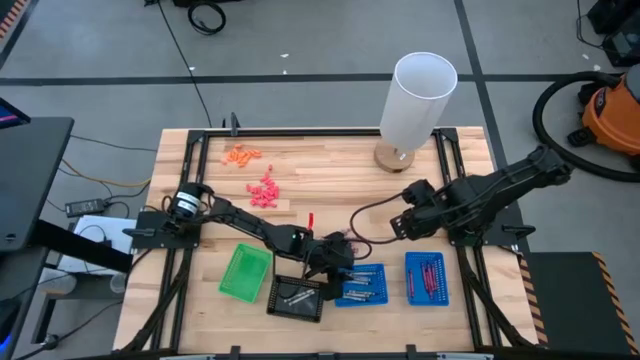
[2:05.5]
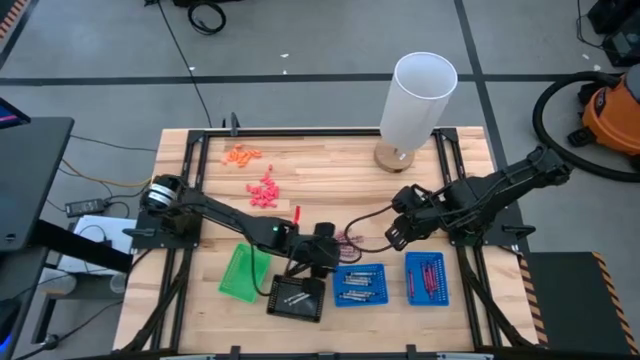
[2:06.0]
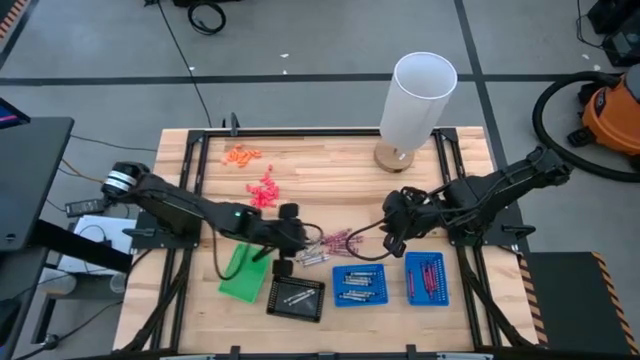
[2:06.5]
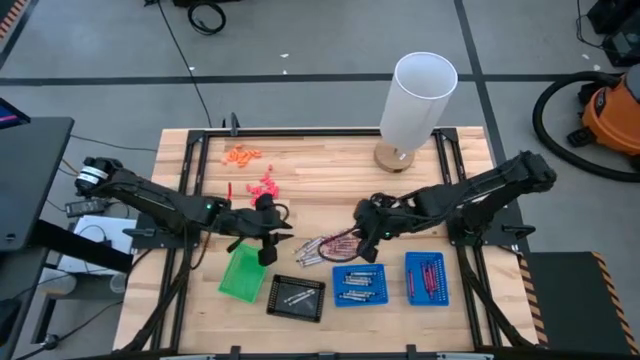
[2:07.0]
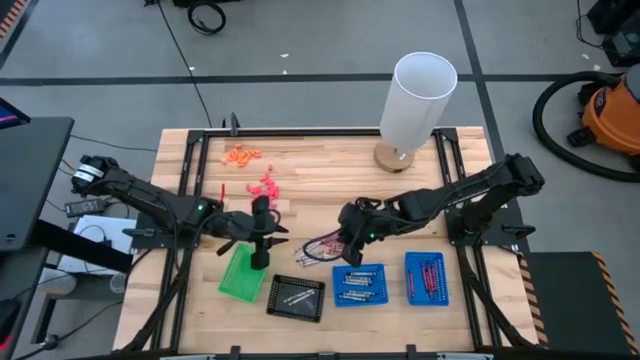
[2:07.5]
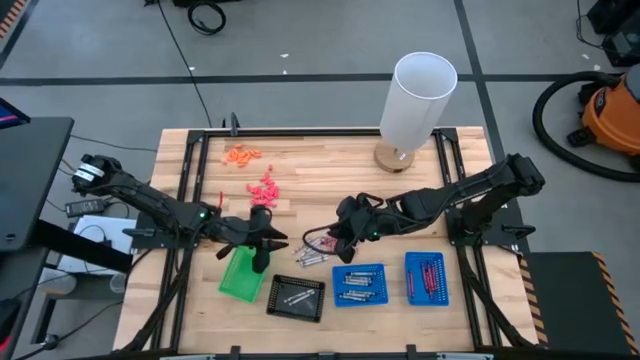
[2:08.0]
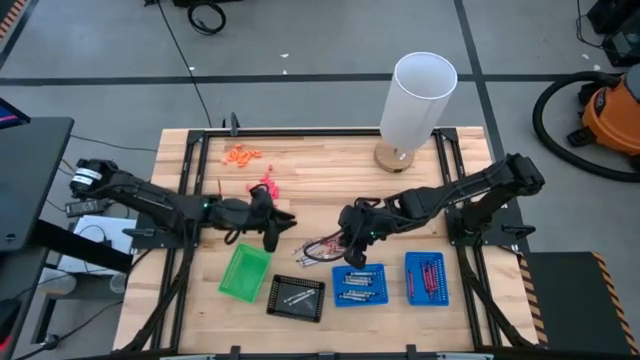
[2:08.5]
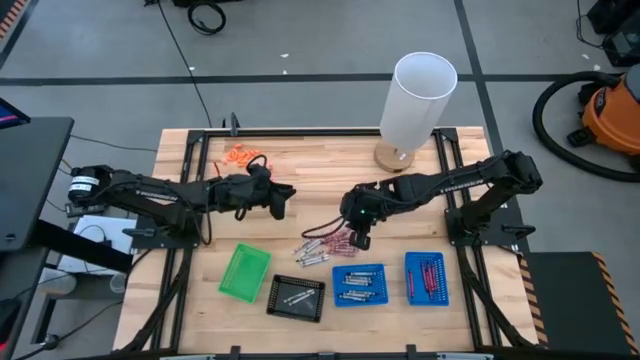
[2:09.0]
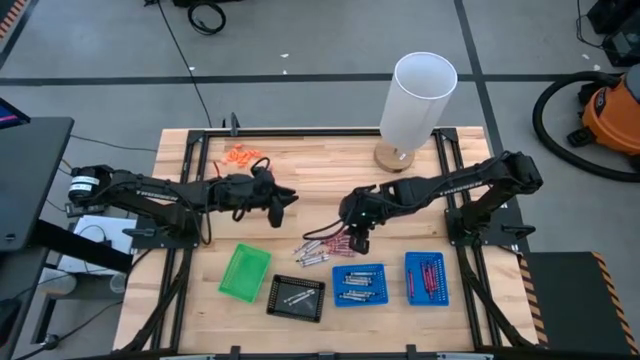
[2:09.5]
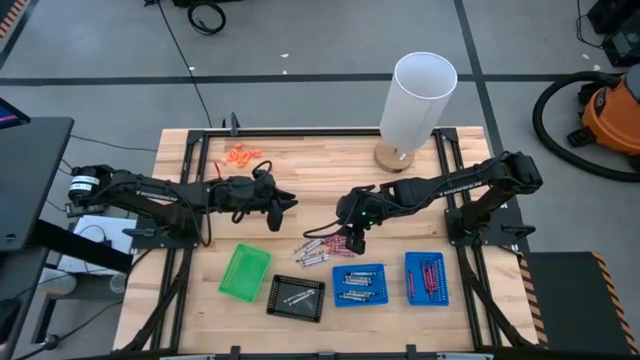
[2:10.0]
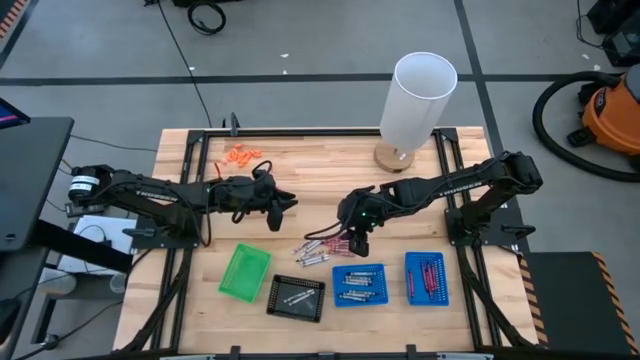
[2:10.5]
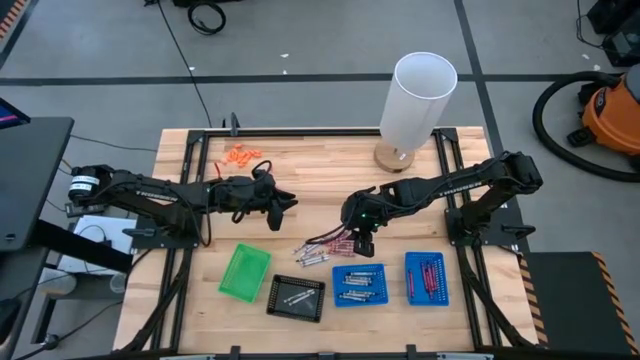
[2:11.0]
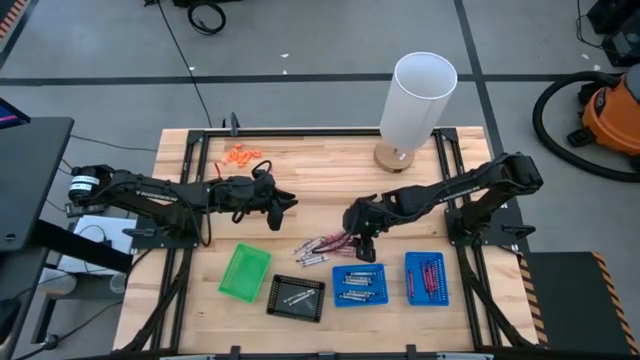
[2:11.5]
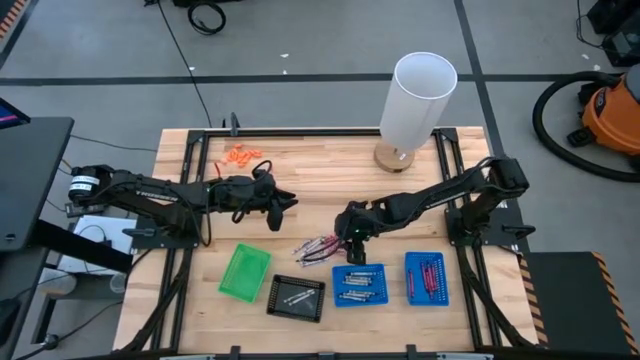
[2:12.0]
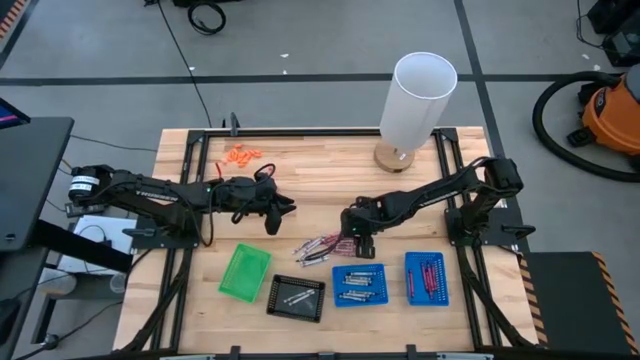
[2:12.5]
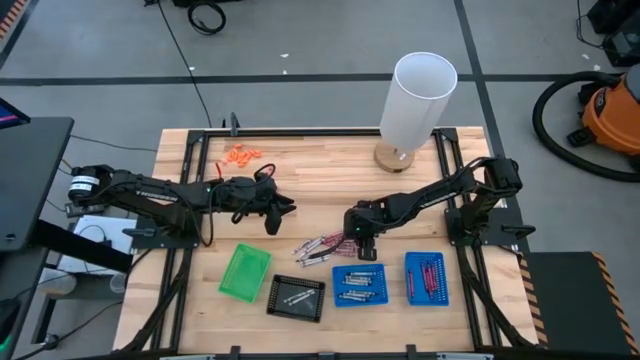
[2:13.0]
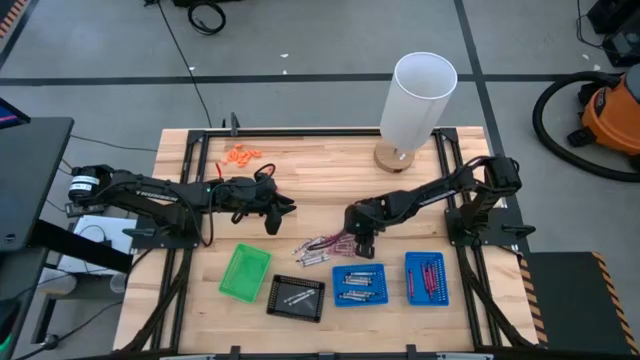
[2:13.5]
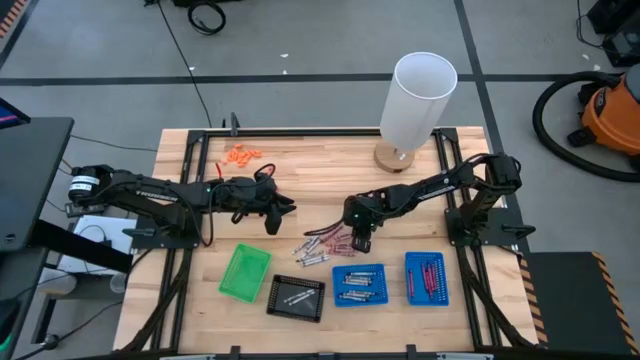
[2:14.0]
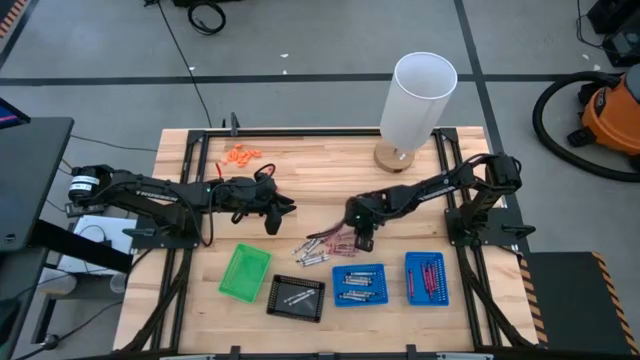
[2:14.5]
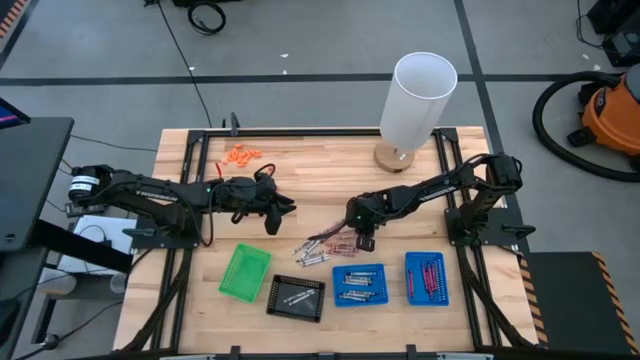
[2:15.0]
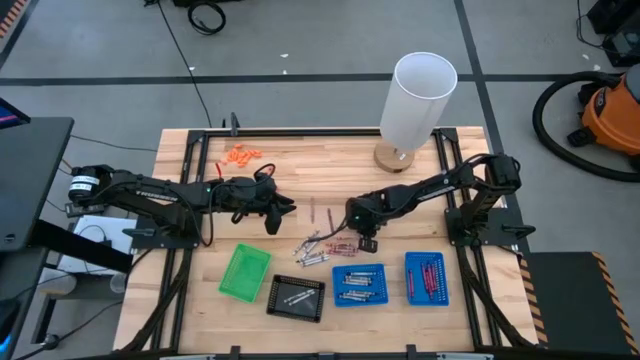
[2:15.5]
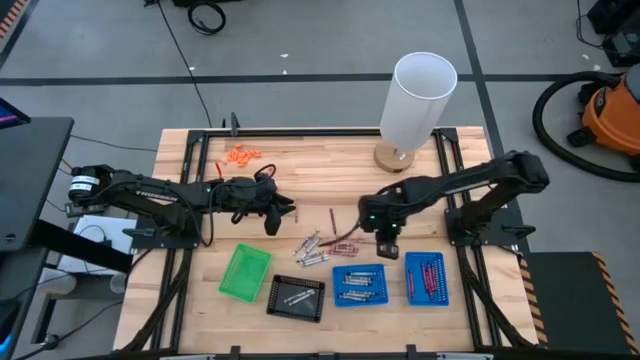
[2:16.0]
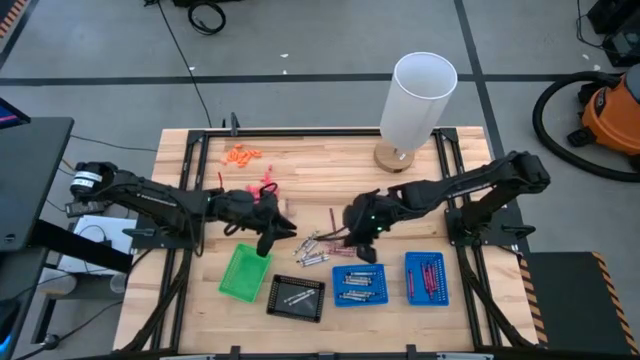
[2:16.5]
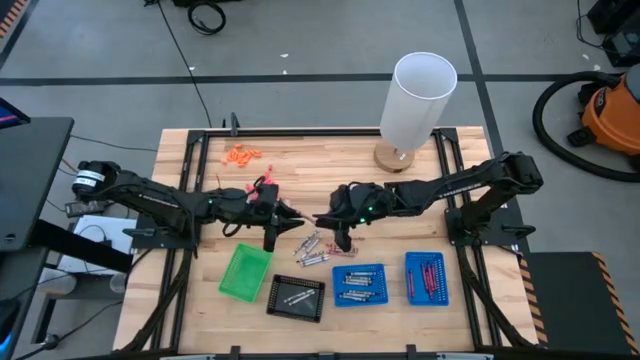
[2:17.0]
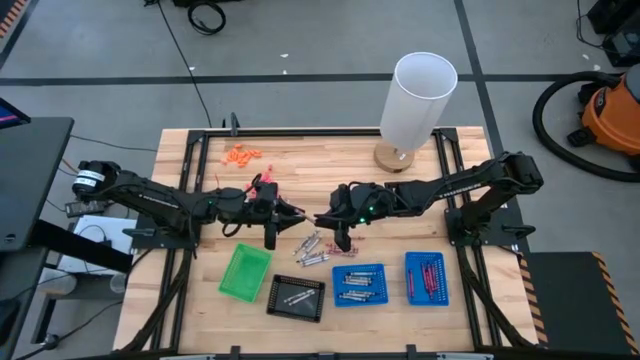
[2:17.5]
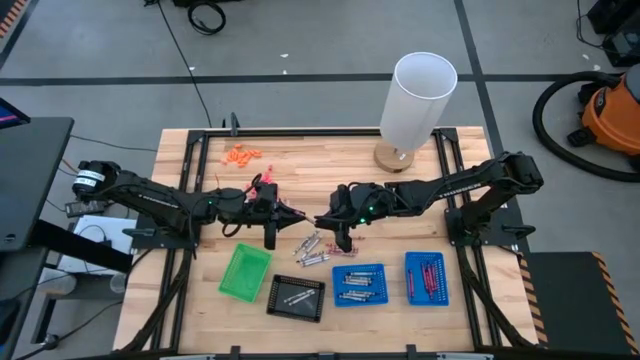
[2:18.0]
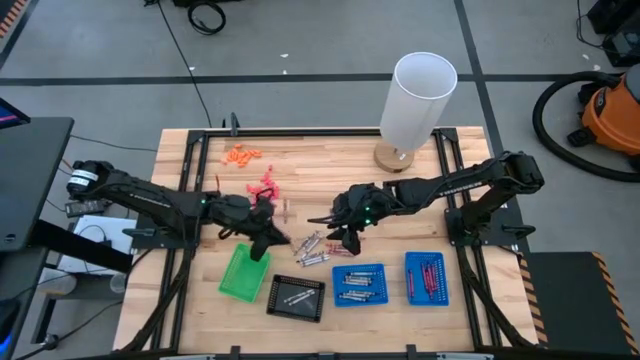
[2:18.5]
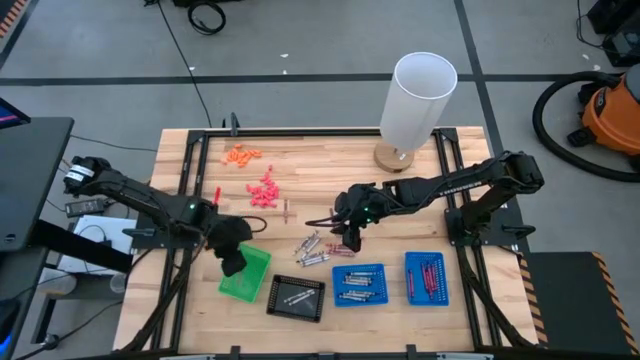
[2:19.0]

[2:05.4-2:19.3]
Task: Sort crayons
Put the pink crayon into the green basket

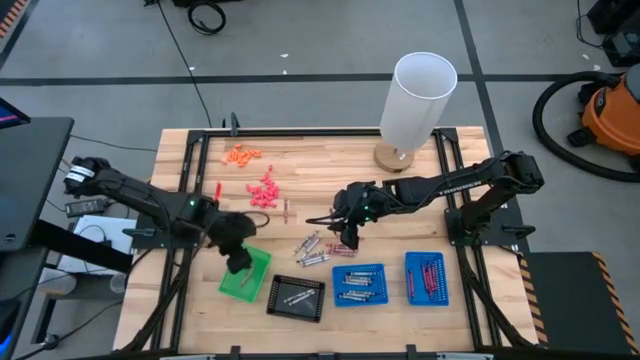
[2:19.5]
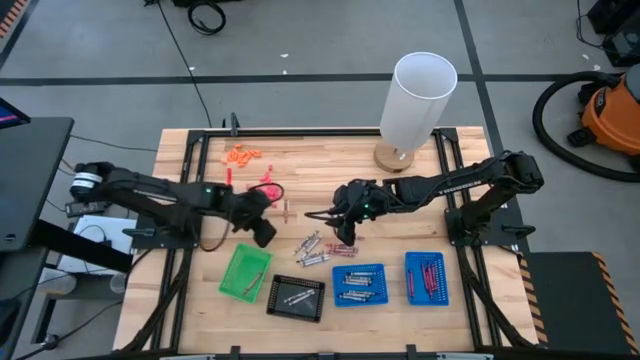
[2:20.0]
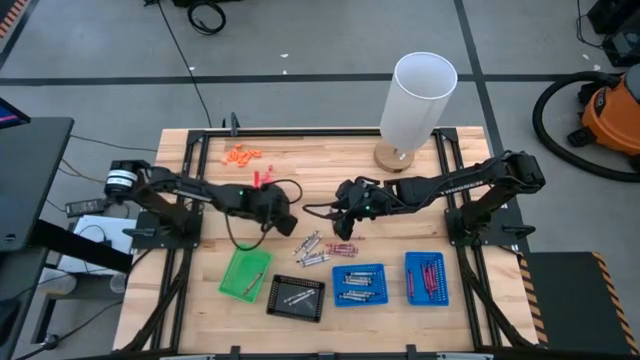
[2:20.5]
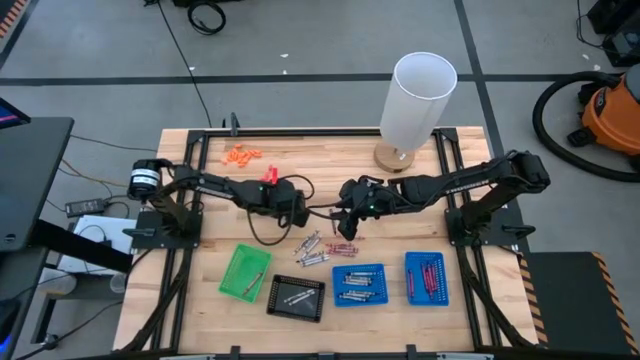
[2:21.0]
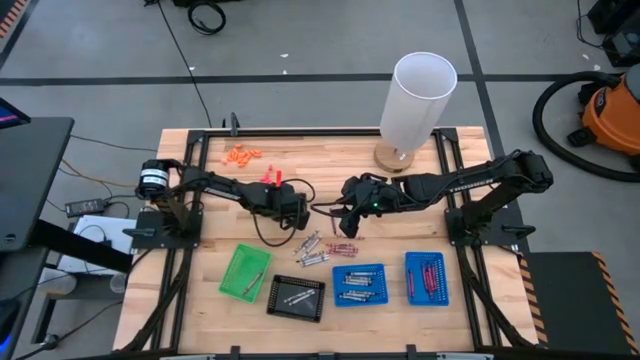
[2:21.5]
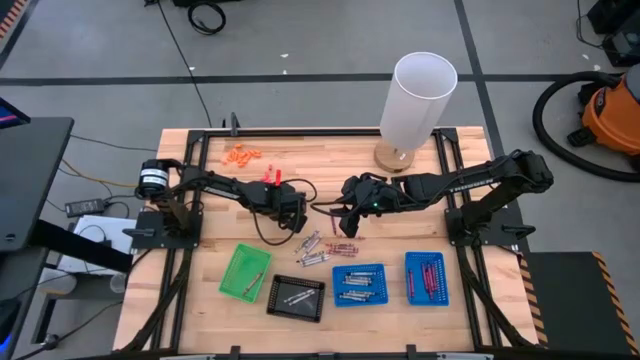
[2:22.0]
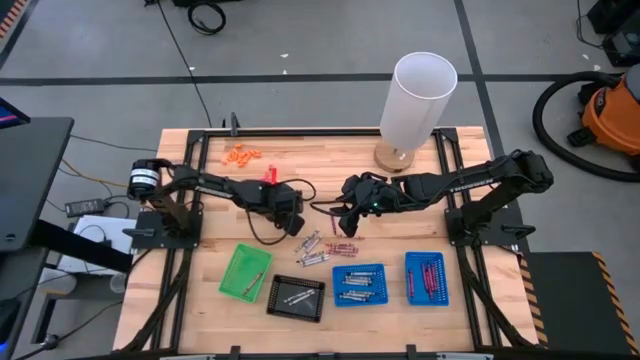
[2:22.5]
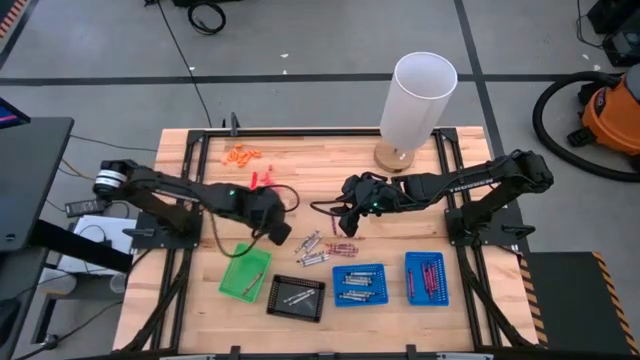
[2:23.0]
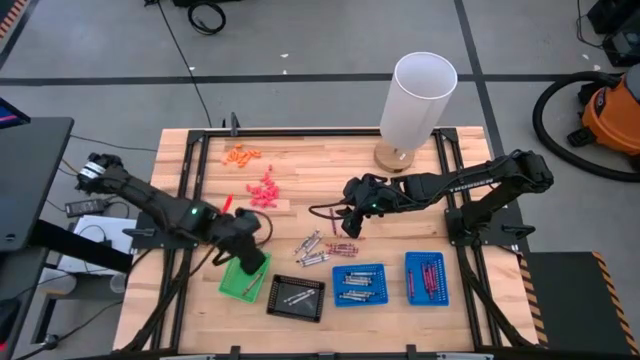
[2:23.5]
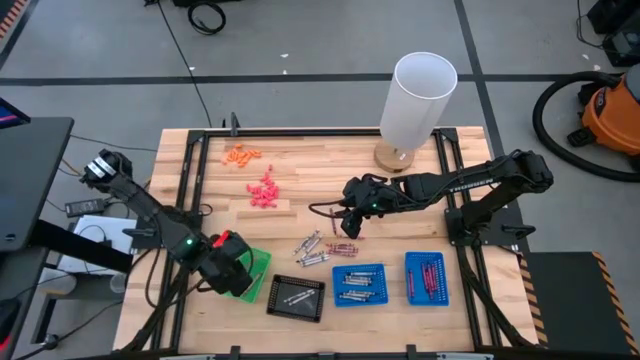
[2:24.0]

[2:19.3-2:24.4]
Put the pink crayon into the green basket

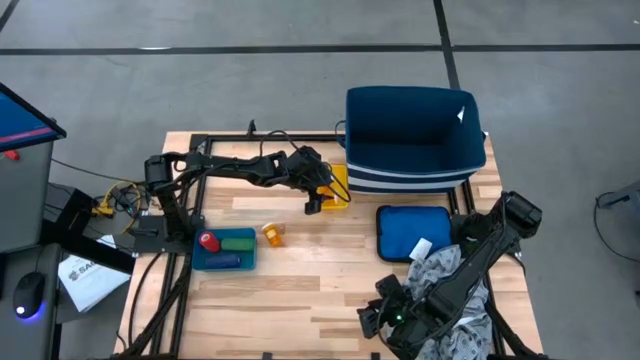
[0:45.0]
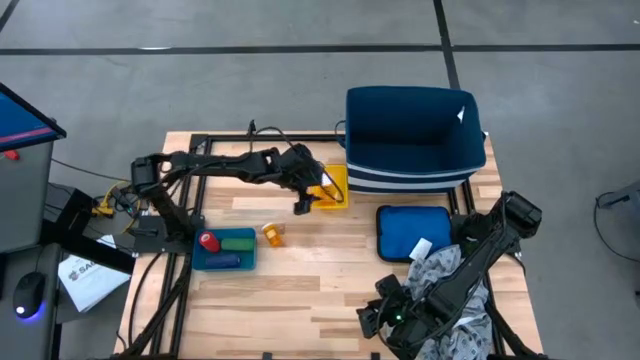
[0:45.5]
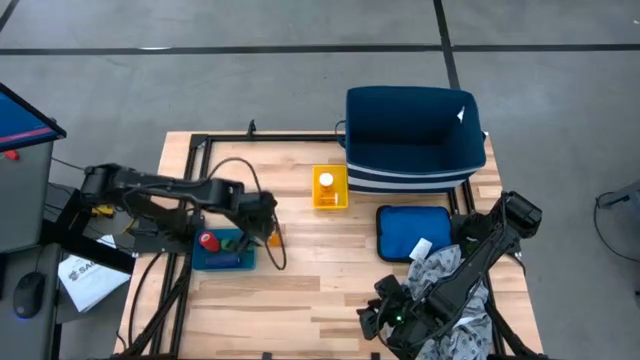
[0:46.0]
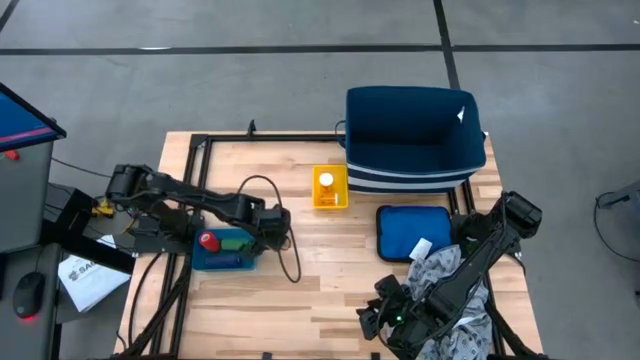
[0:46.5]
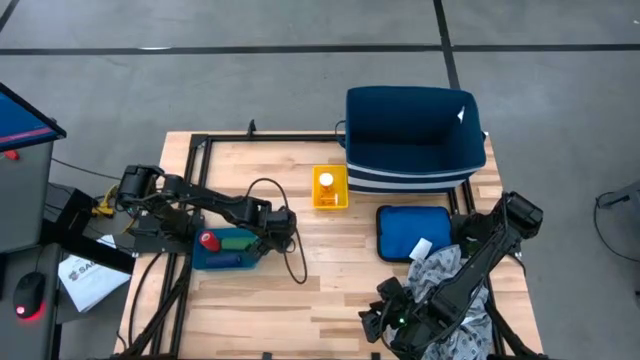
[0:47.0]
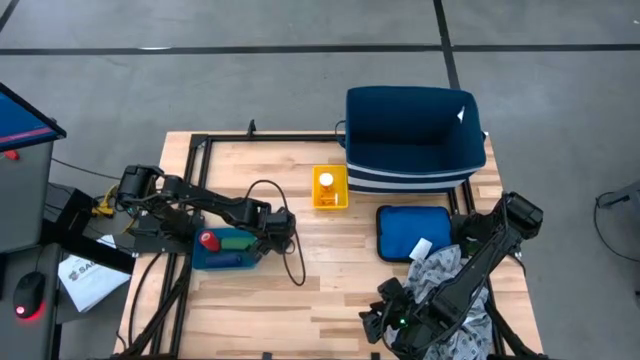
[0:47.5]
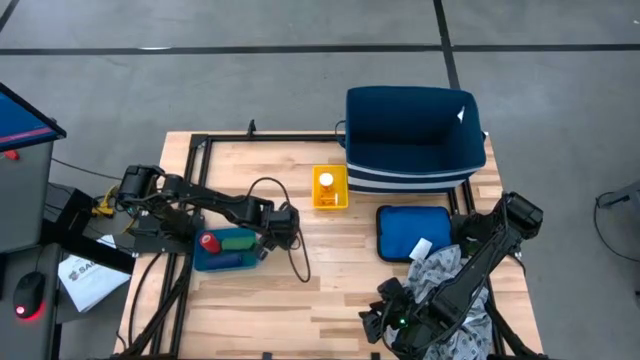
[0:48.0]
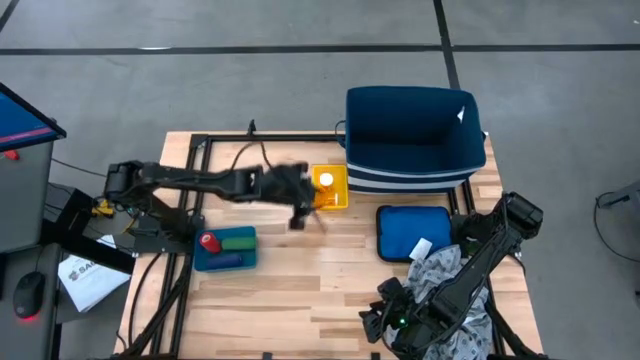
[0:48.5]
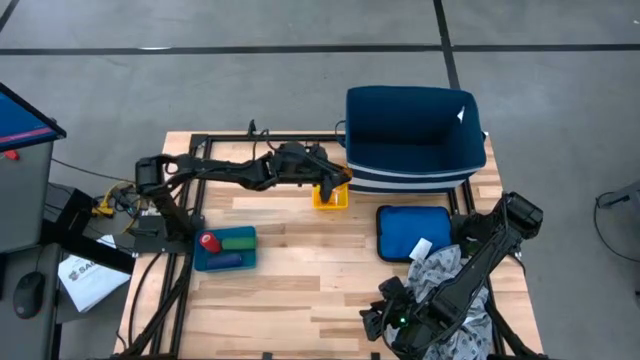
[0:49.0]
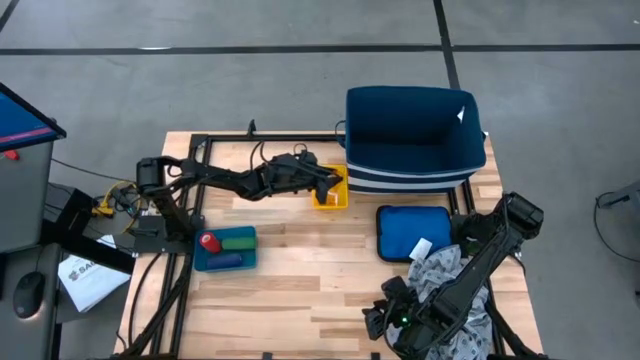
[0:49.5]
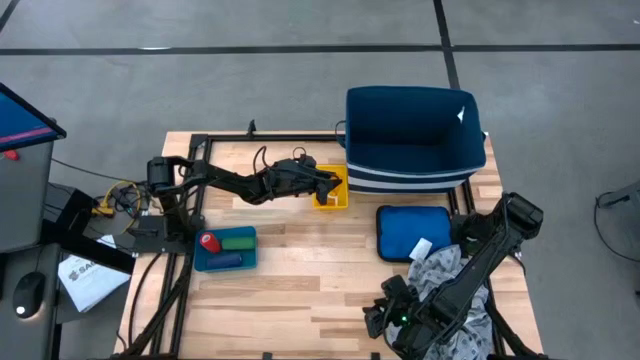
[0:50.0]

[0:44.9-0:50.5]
Task: Pick & place medical supplies in basket/bin
Put the orange pill bottle into the yellow bin
